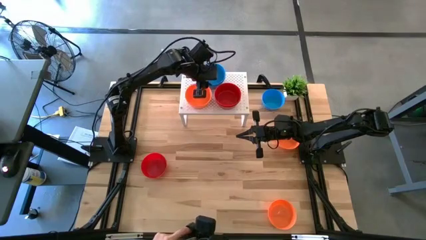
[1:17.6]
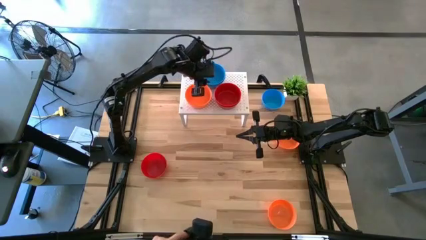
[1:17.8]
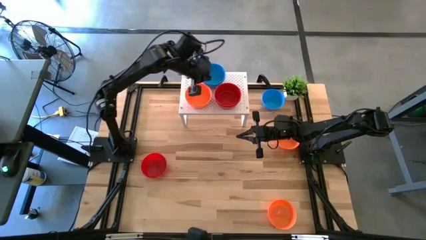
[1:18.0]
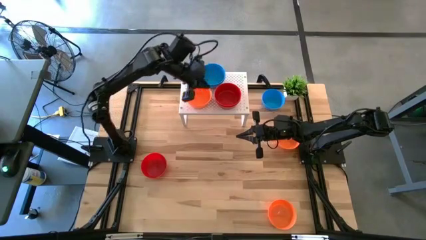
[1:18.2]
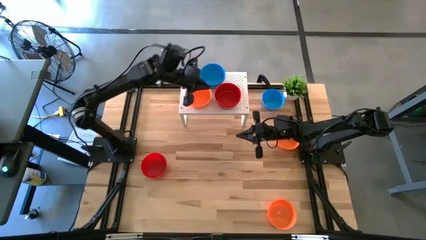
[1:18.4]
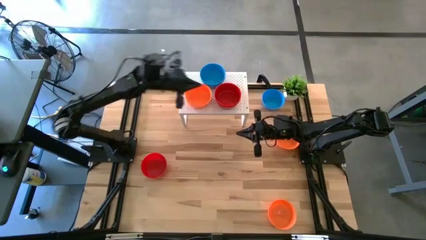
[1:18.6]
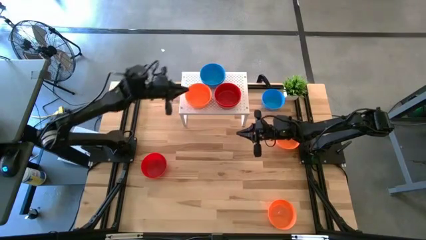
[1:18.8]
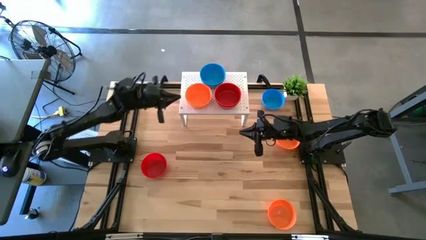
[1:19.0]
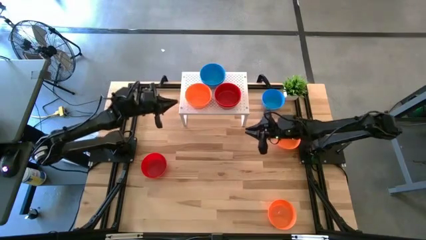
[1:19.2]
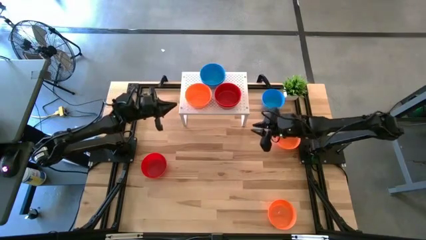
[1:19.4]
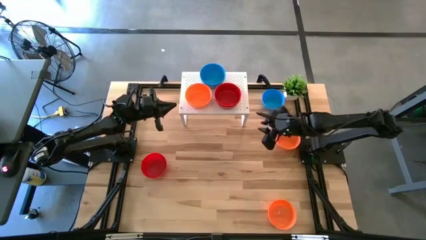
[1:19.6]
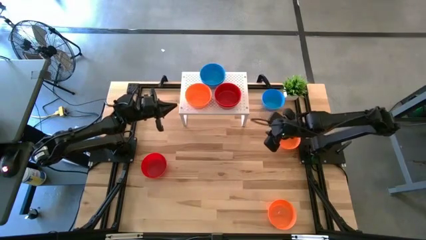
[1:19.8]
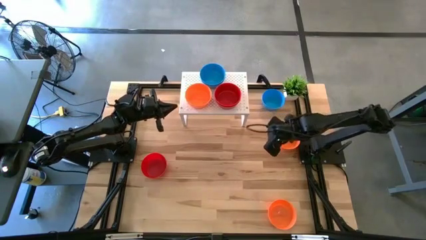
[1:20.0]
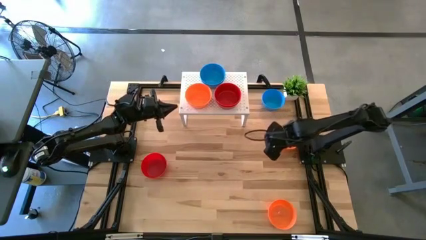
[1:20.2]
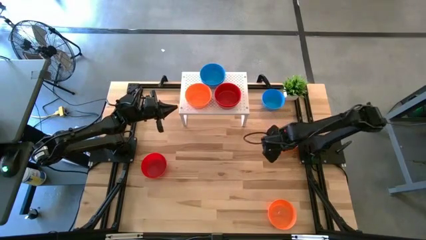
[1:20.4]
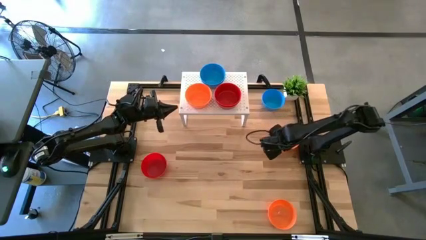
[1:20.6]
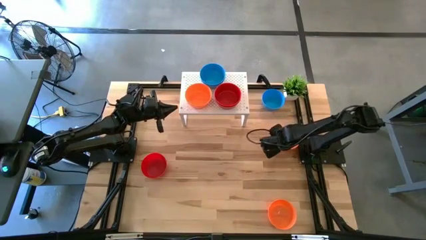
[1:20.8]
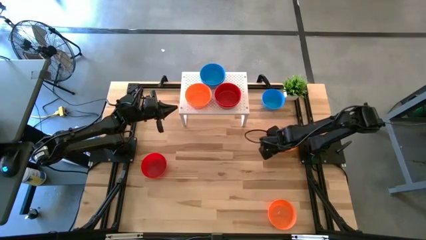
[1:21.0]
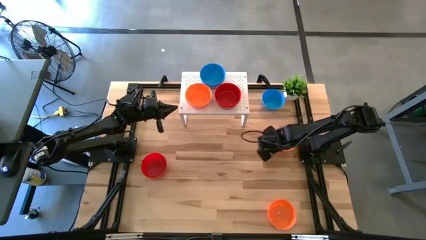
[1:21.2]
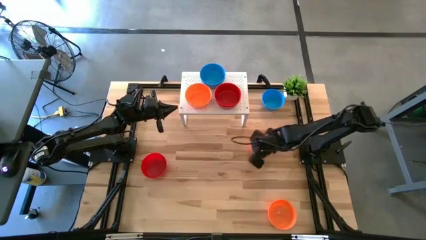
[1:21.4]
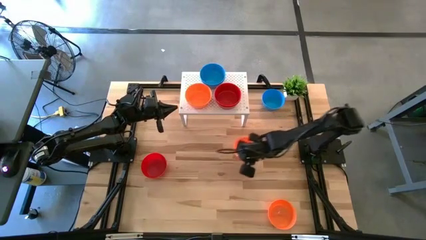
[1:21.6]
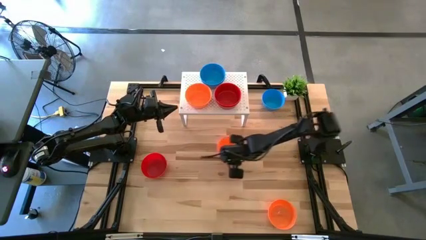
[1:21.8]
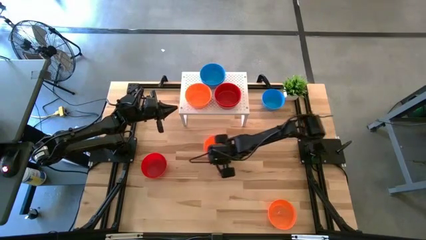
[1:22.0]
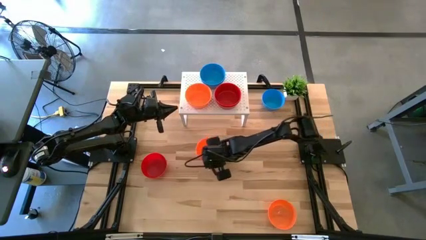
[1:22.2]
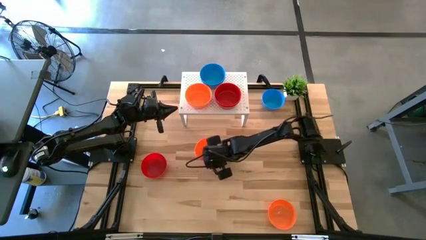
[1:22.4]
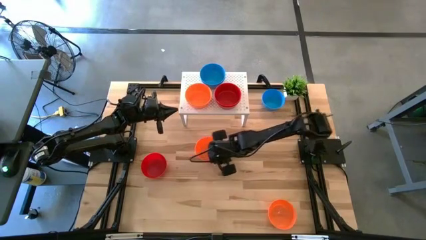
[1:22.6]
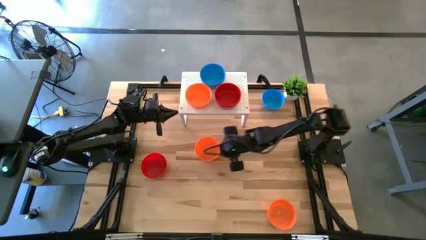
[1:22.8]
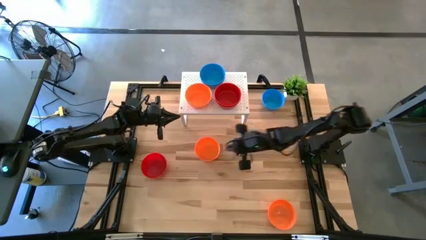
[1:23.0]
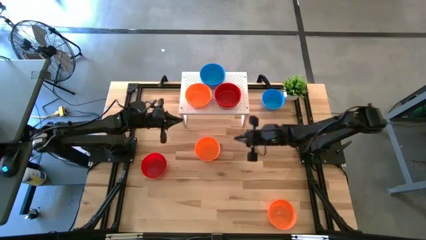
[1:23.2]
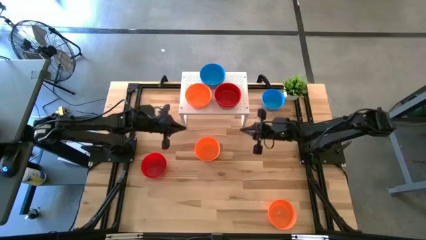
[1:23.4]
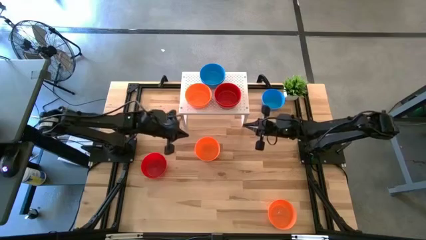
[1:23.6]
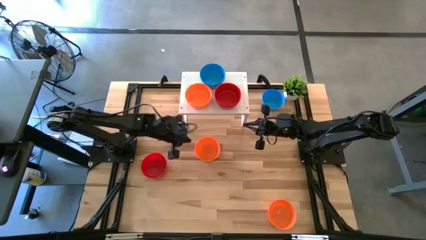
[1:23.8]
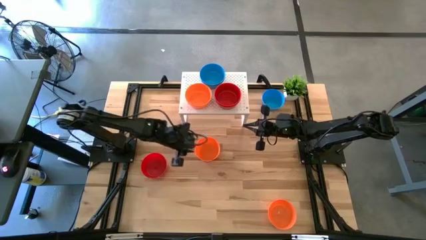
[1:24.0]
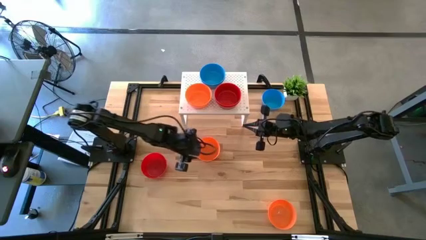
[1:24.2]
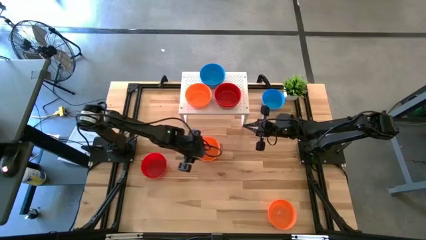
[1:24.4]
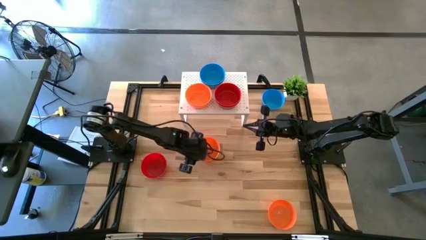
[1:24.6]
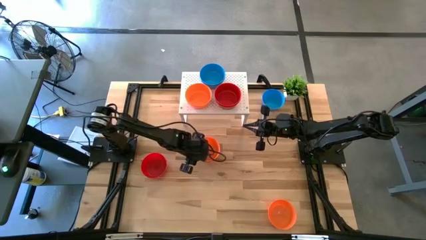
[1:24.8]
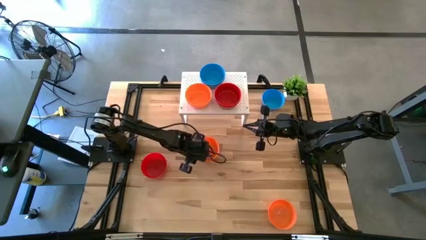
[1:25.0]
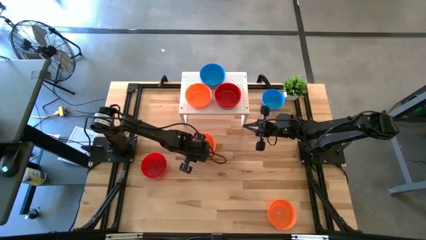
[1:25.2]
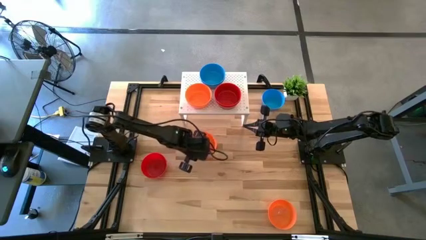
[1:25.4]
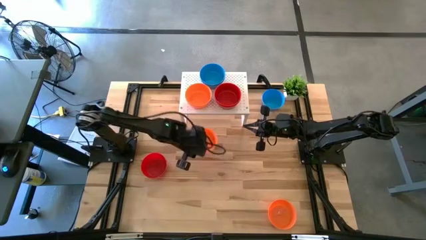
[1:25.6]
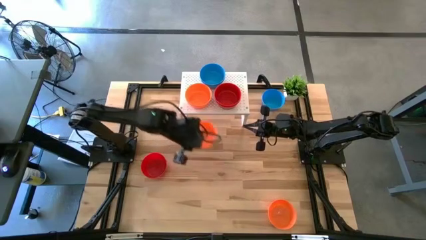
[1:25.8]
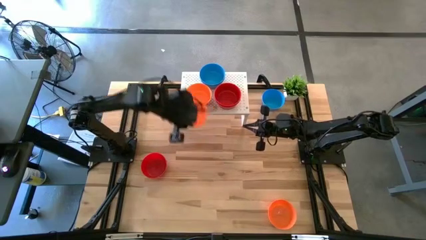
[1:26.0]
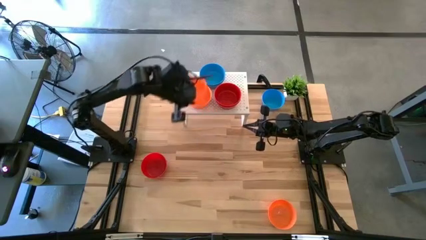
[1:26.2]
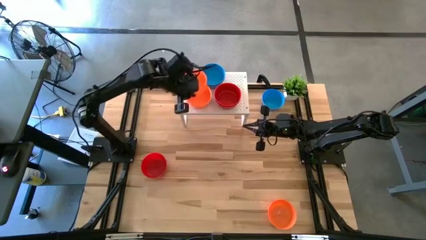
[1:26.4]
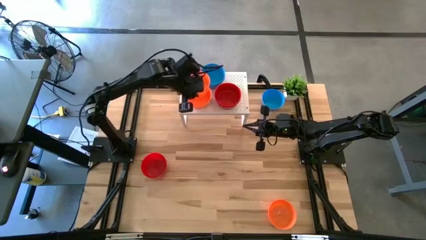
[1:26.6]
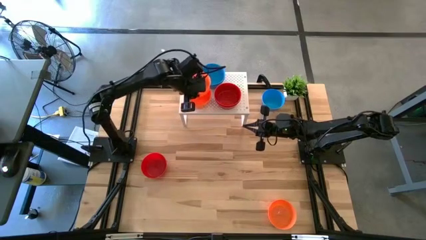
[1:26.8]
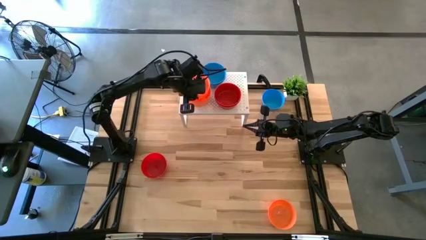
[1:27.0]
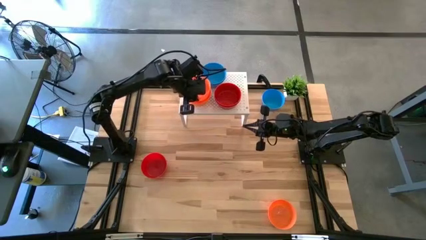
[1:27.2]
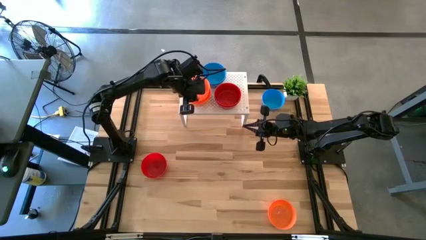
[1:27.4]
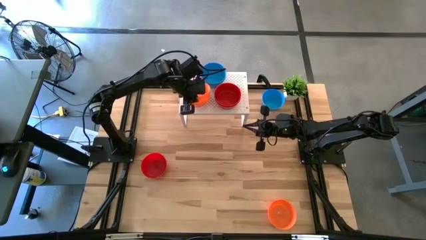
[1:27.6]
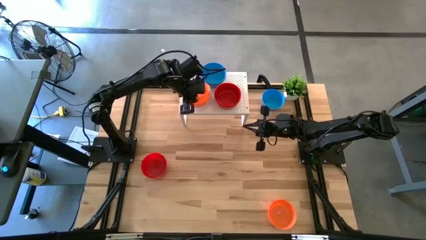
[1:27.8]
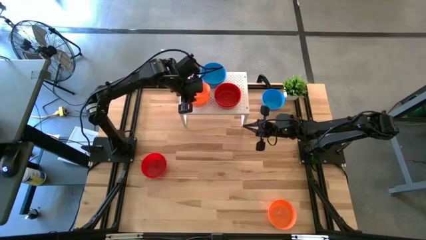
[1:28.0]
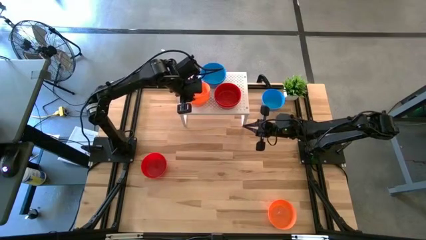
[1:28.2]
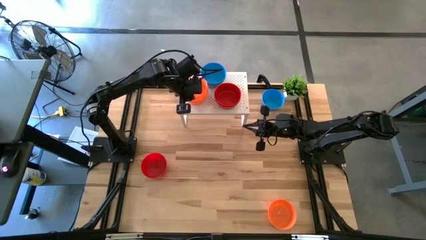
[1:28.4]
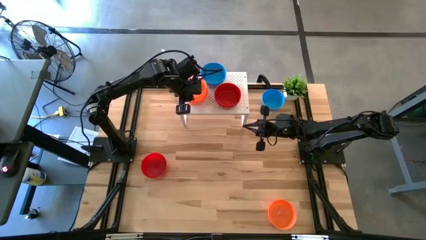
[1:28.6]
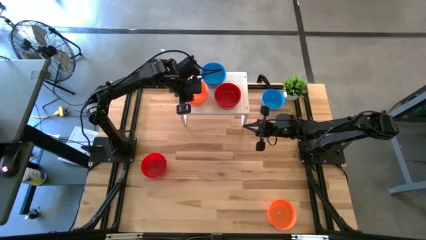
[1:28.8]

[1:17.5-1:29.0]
Task: Pick & Place Mini bowls
Stack the orange bowl on the orange bowl on the shelf

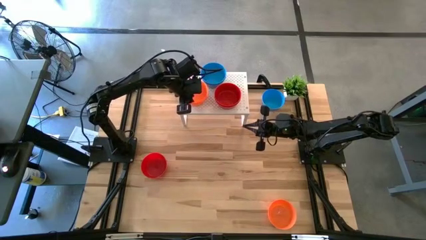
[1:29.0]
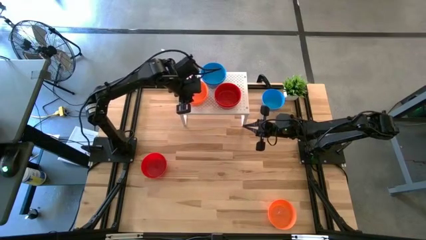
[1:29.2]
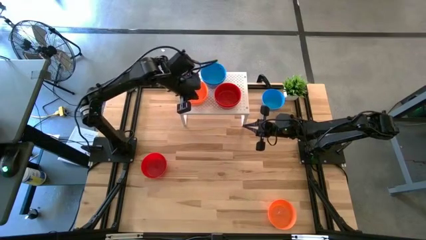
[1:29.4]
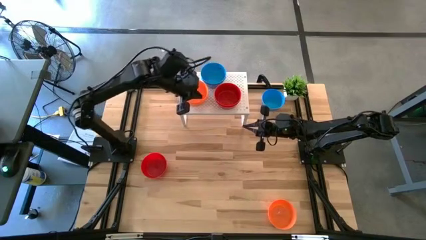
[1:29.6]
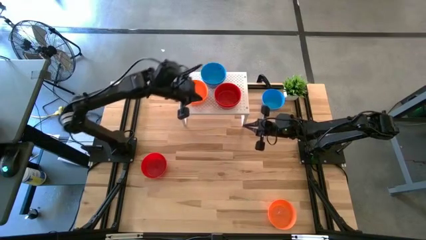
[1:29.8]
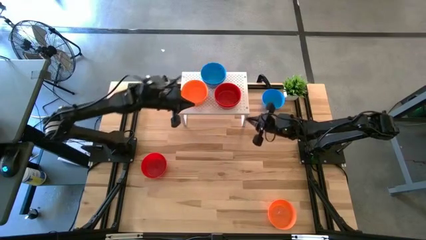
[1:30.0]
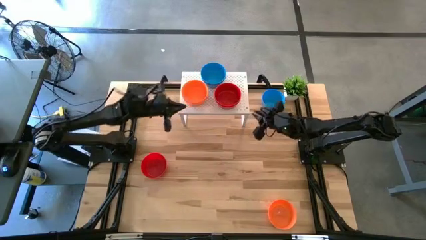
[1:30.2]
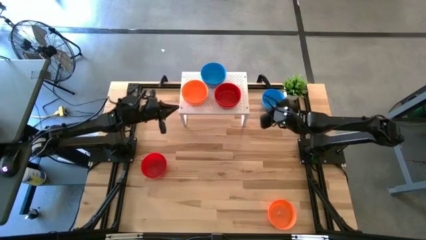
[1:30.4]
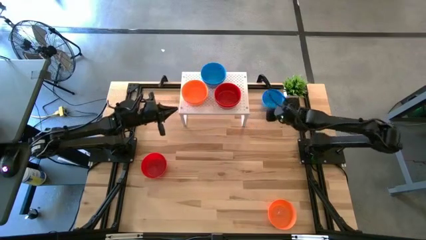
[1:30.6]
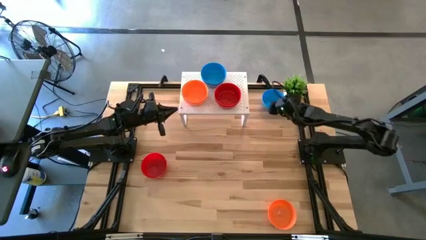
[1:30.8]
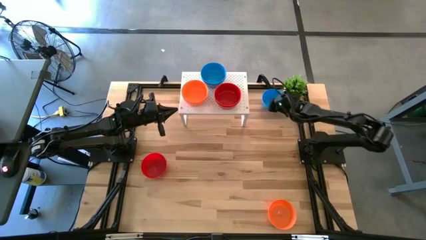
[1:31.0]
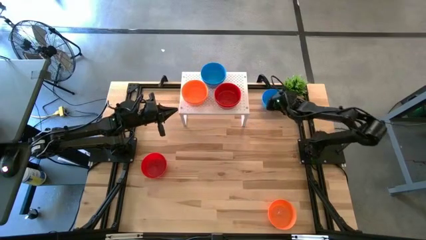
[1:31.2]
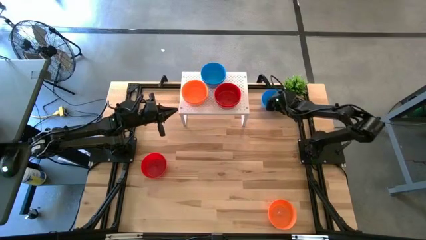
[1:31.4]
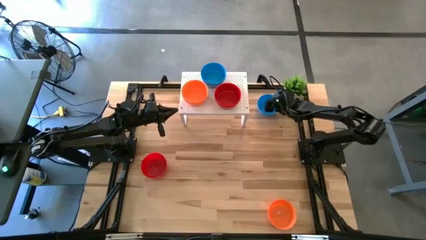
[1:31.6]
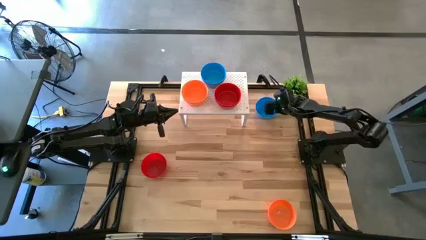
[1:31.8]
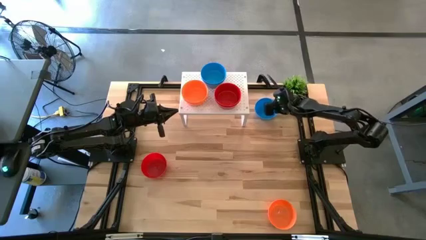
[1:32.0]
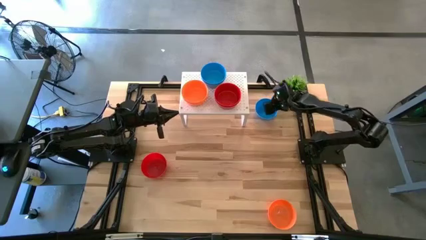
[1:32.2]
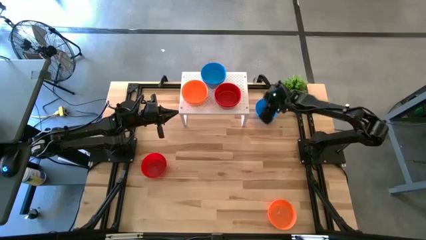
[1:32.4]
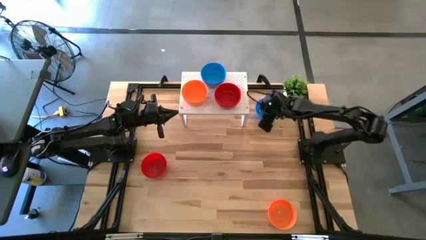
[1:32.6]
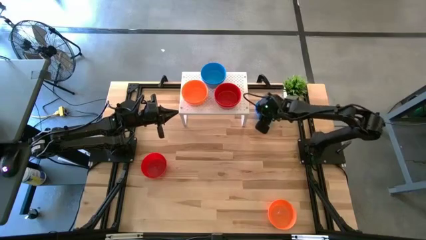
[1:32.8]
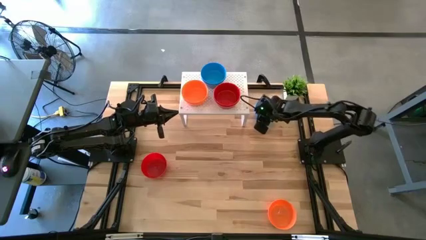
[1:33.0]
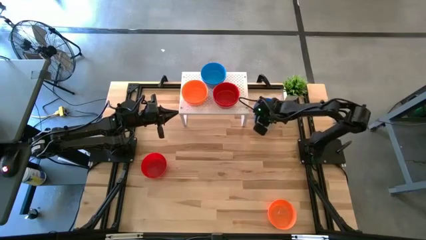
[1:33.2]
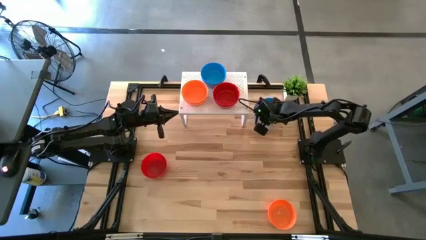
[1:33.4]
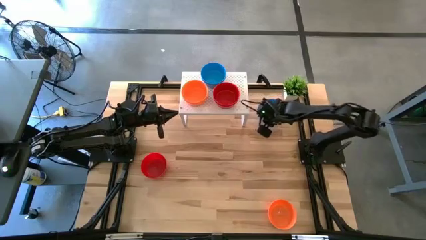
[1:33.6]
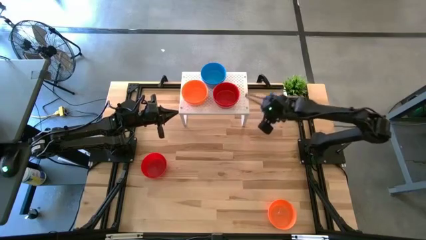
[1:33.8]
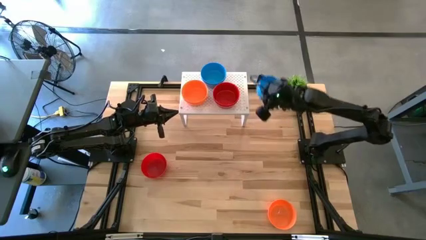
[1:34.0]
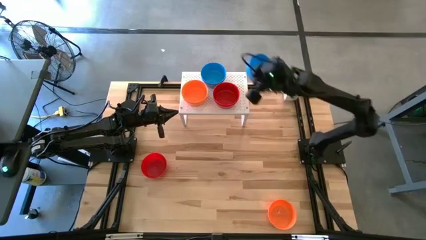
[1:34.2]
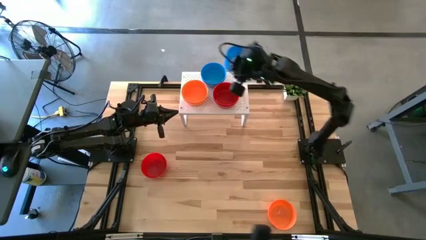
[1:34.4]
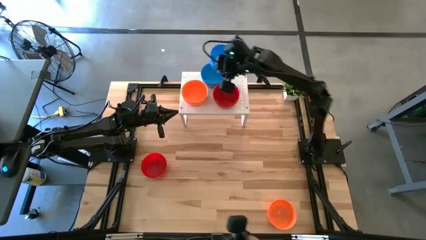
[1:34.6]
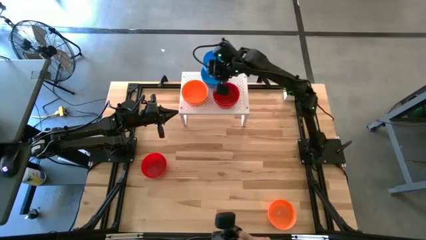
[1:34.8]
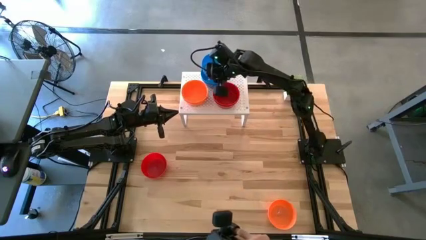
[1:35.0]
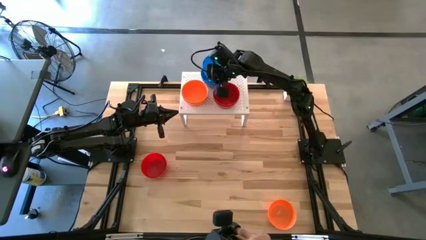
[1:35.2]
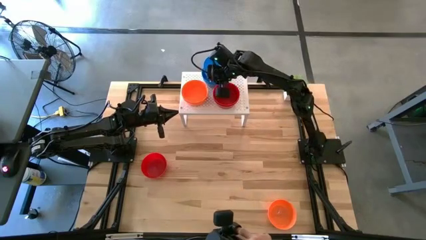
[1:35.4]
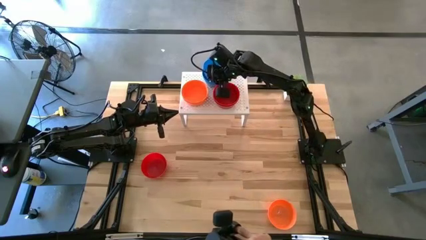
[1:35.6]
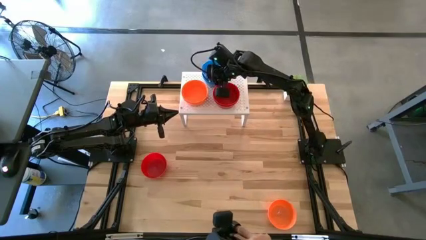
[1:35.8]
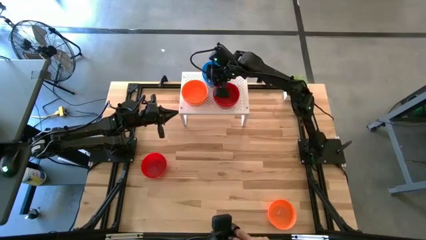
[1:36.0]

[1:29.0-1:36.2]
Stack the blue bowl on the blue bowl on the shelf
